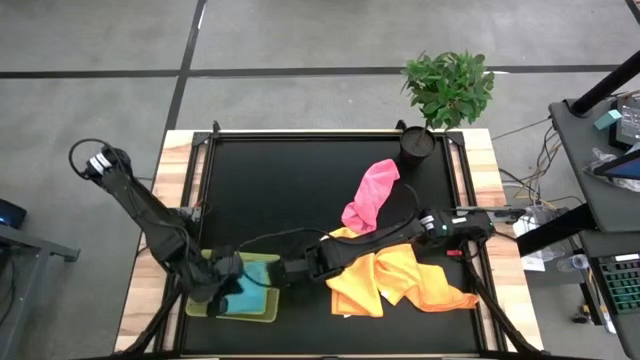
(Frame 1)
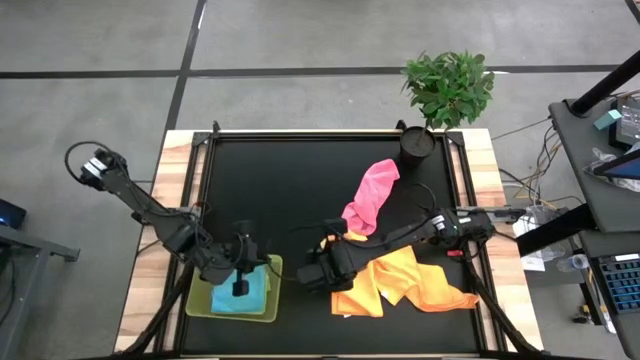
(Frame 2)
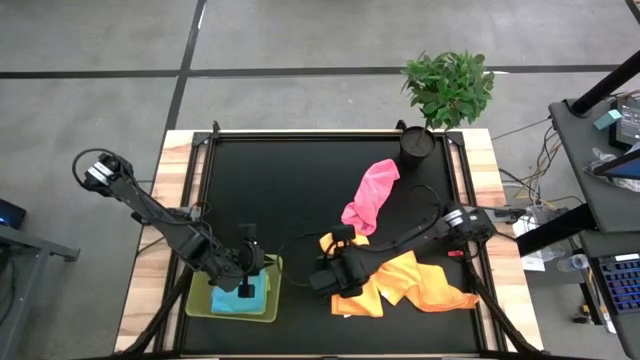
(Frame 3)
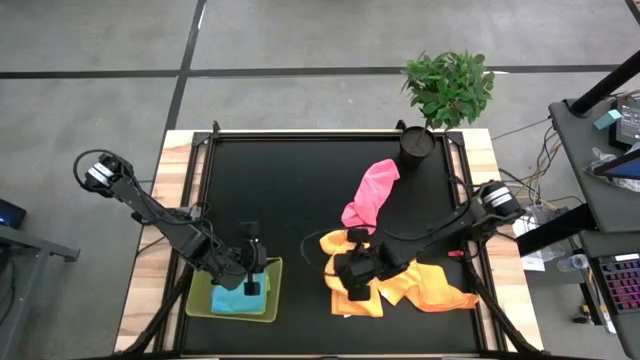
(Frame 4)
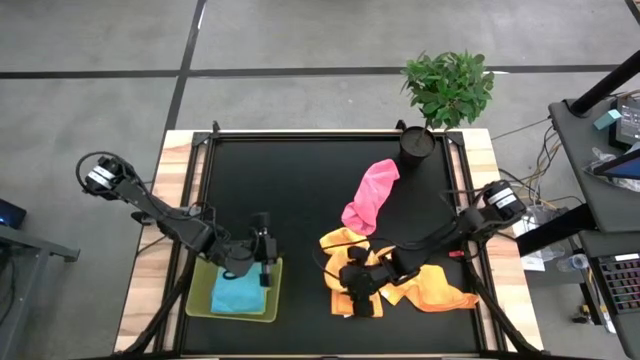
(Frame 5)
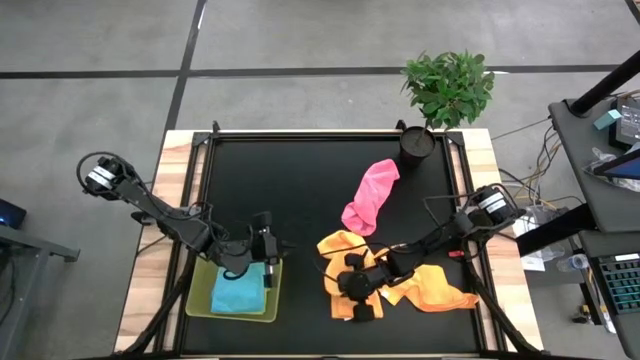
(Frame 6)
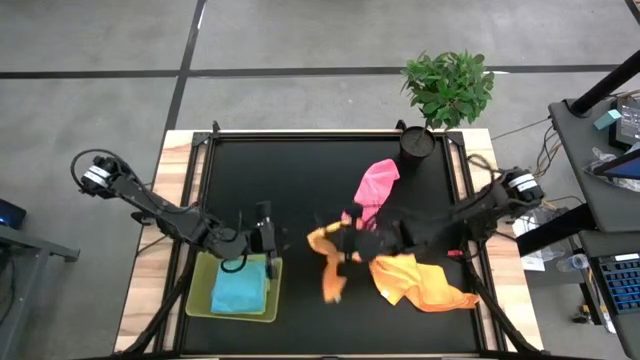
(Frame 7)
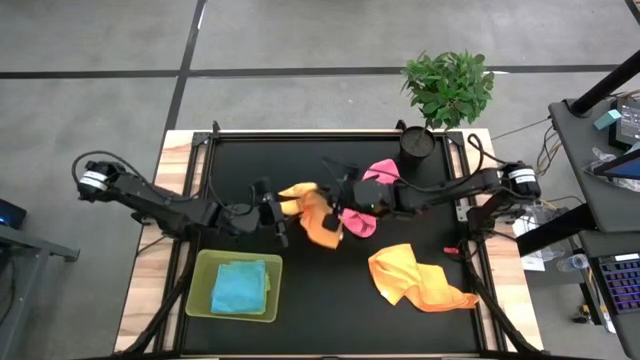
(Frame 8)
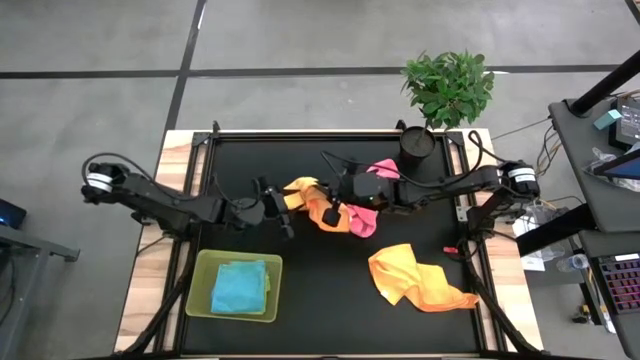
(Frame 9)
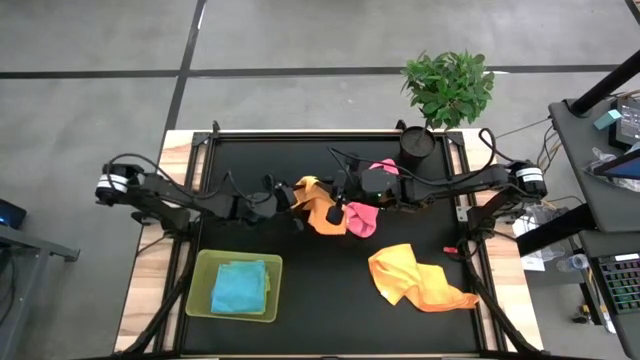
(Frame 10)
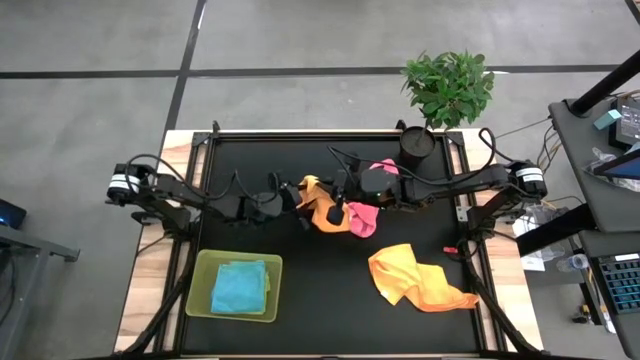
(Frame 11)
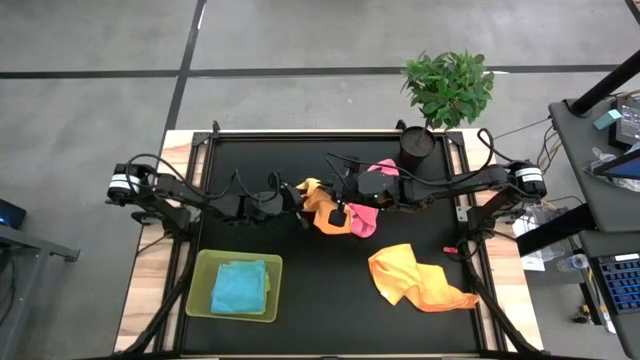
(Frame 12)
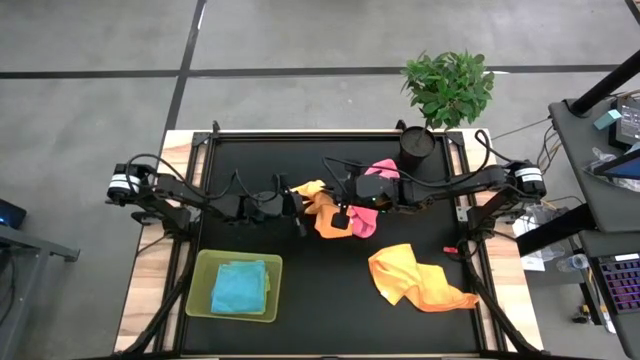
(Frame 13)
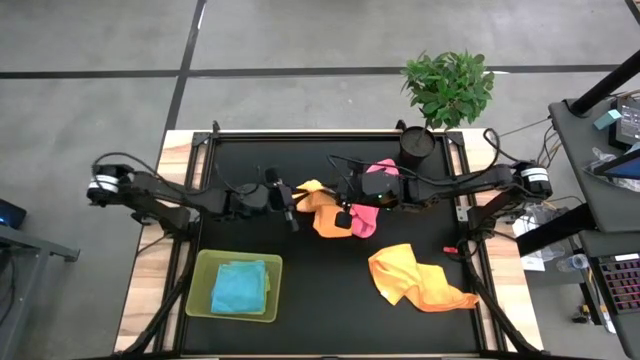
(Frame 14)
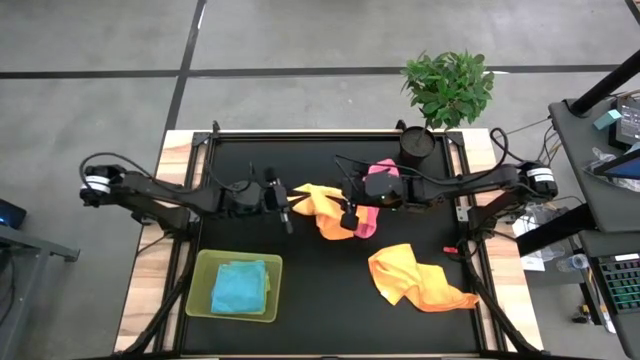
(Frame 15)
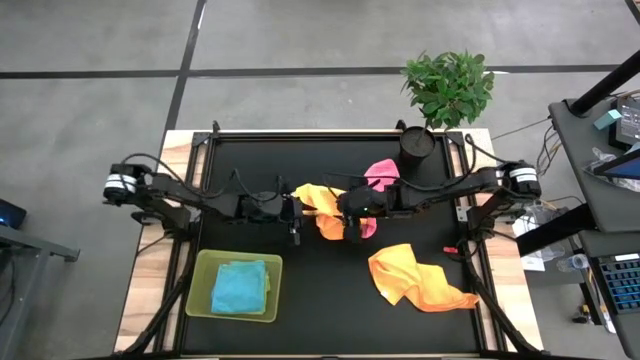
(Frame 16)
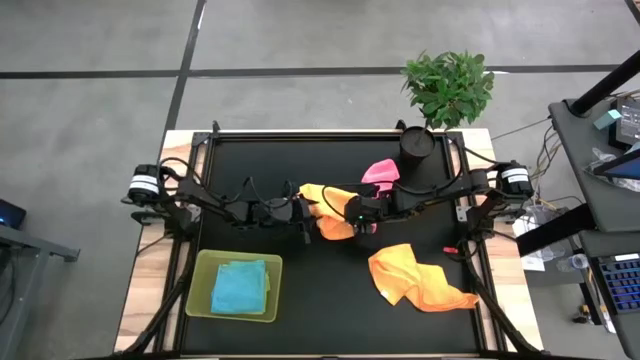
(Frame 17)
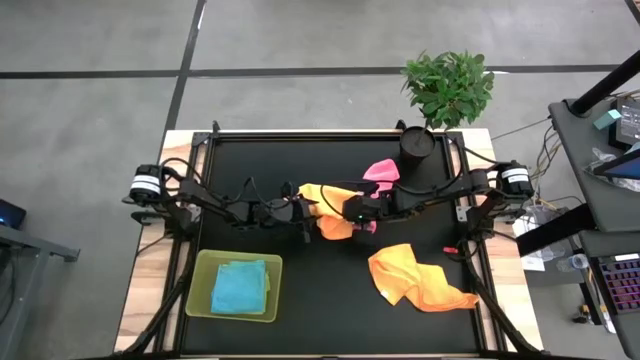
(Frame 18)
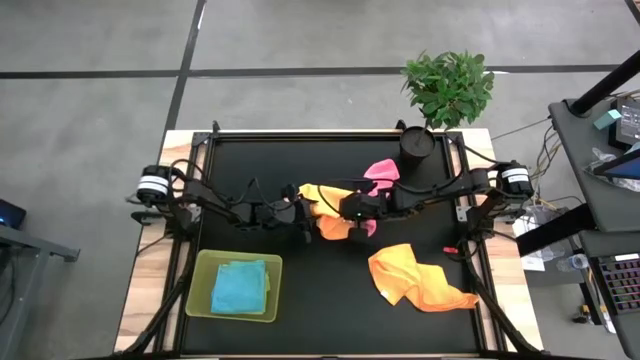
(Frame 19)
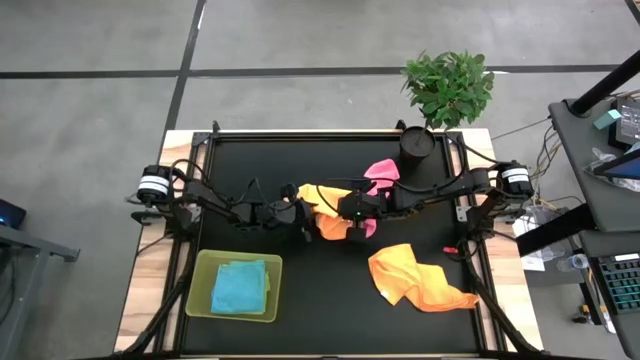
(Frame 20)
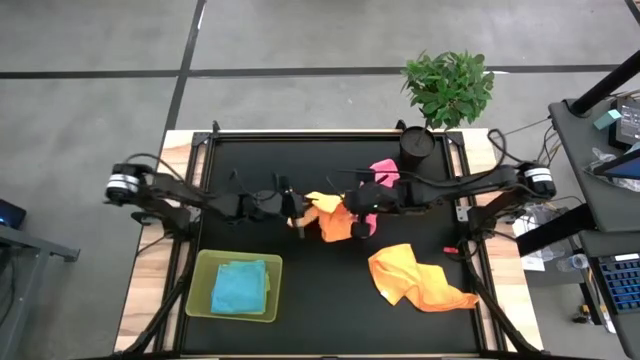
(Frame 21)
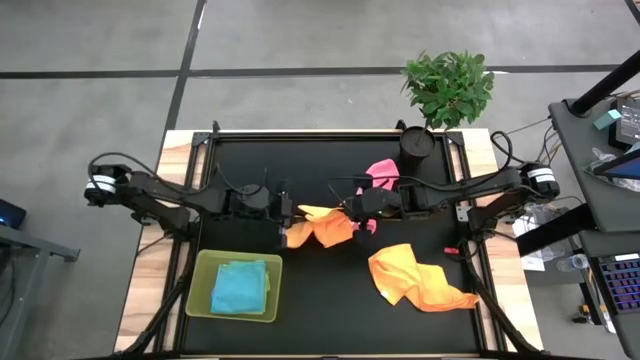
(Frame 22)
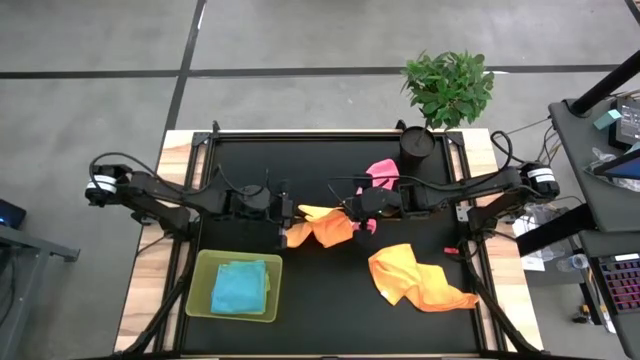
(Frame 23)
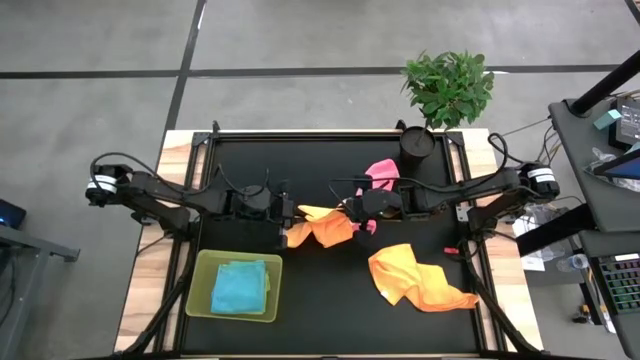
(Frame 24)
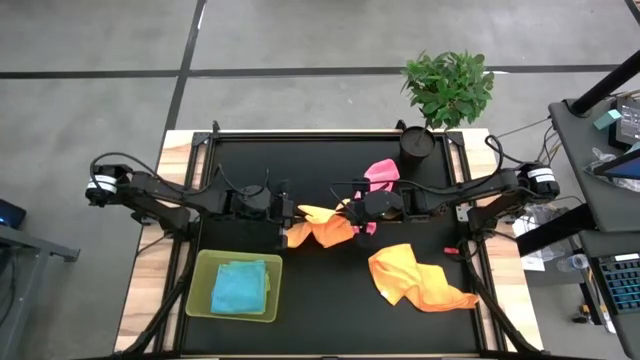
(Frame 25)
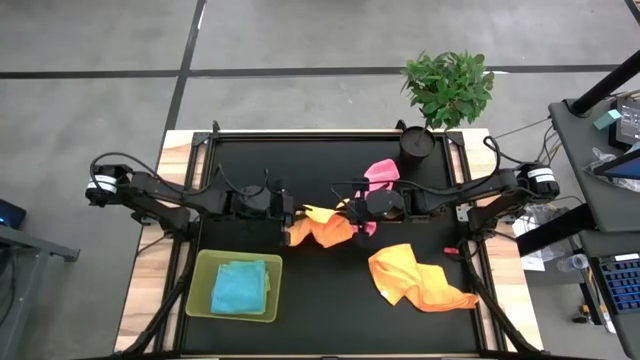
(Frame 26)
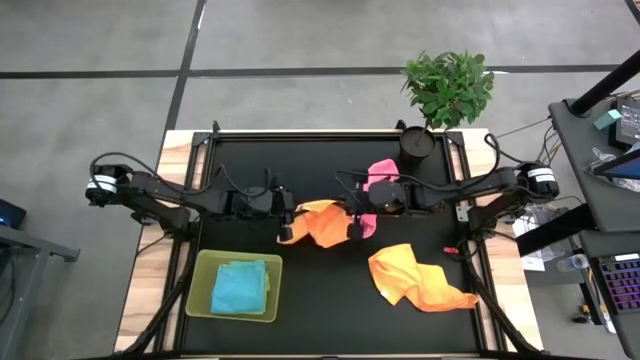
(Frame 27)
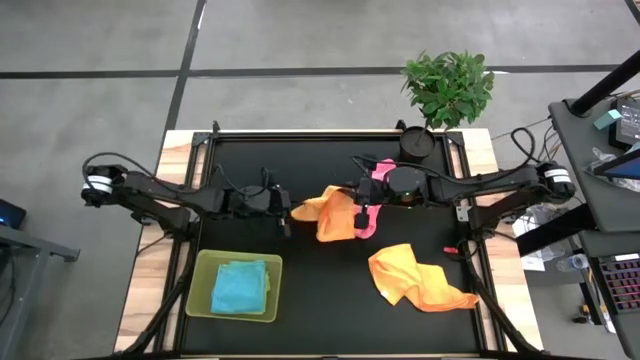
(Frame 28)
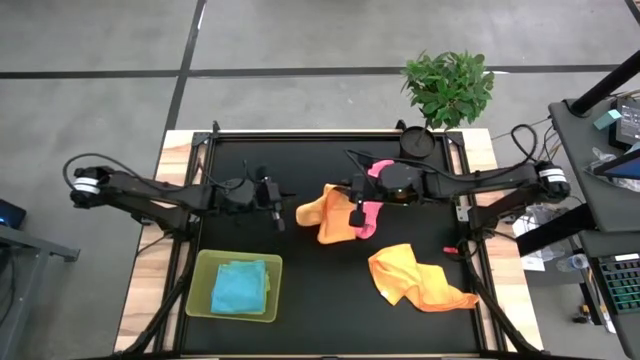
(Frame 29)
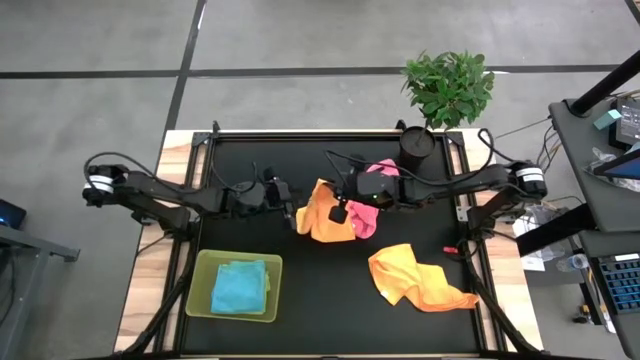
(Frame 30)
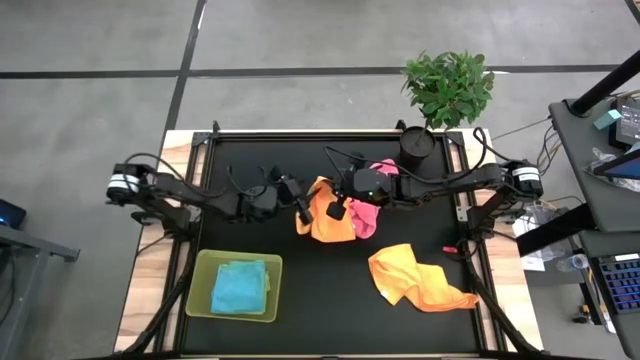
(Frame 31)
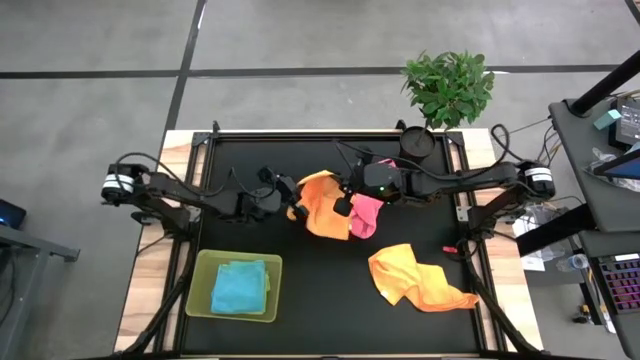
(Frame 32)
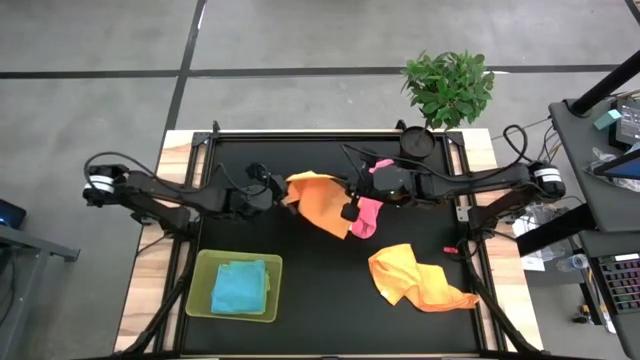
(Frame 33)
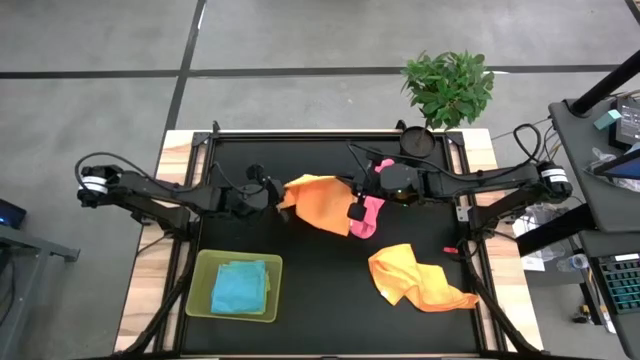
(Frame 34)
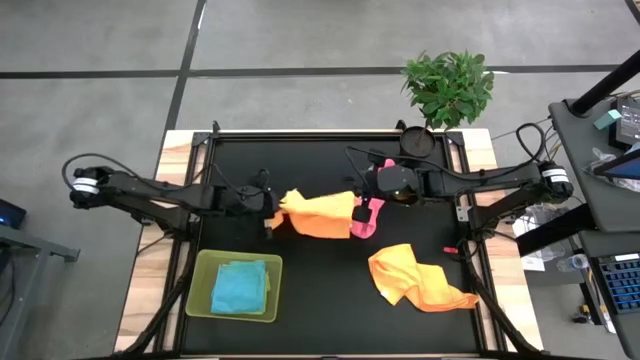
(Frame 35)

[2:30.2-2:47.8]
Task: Fold microfiber towels
Fold the left orange microfiber towel

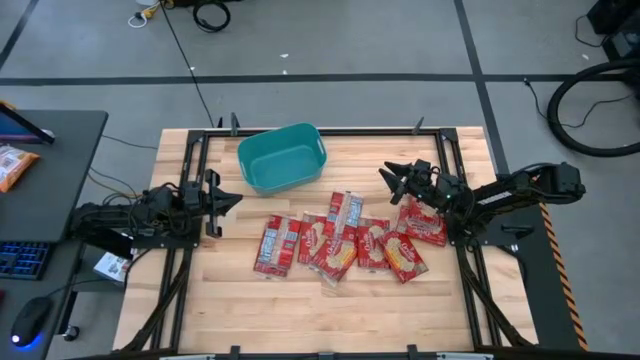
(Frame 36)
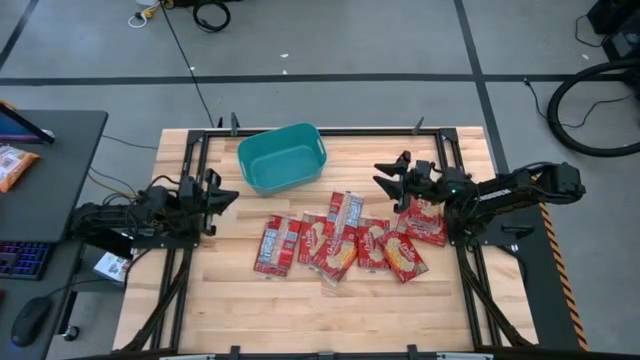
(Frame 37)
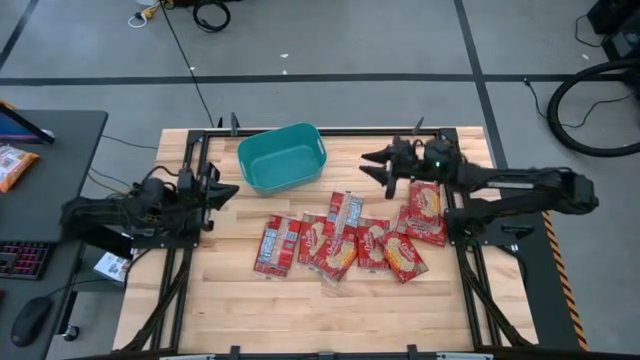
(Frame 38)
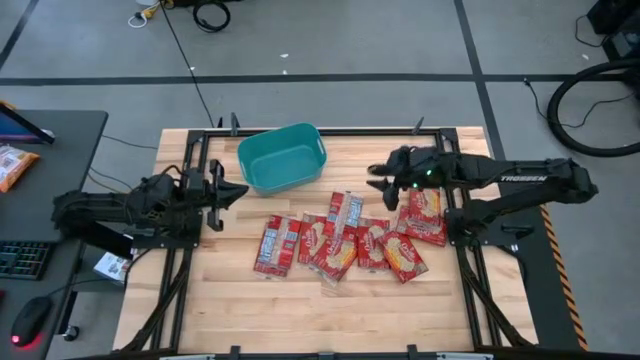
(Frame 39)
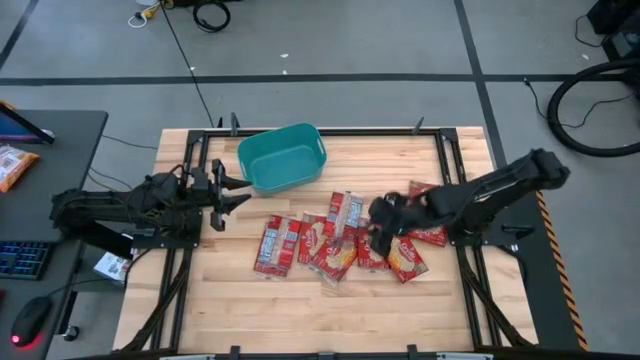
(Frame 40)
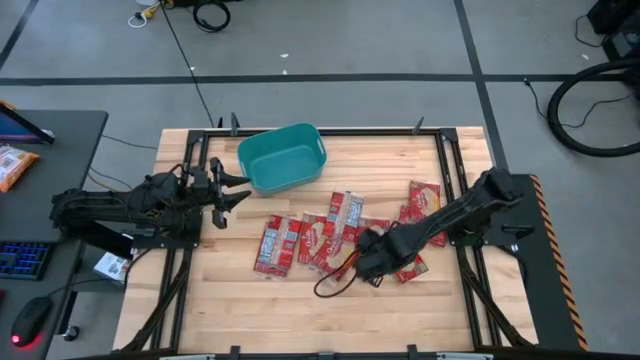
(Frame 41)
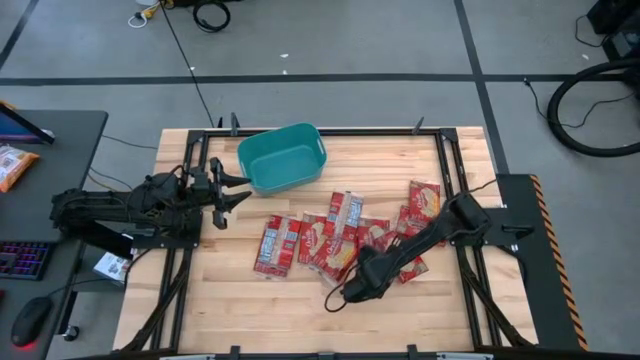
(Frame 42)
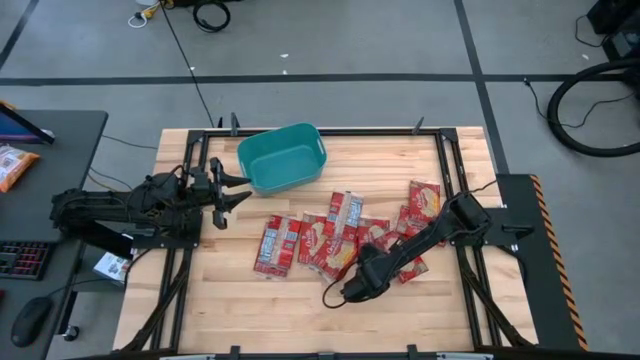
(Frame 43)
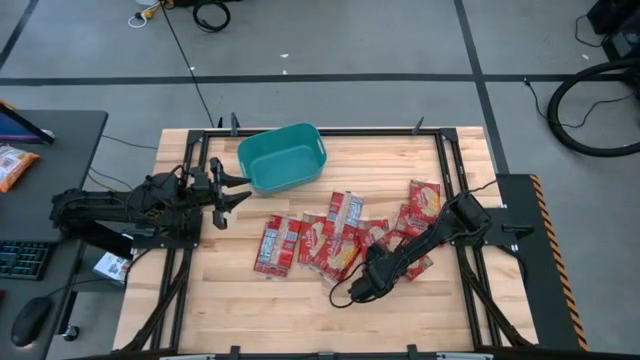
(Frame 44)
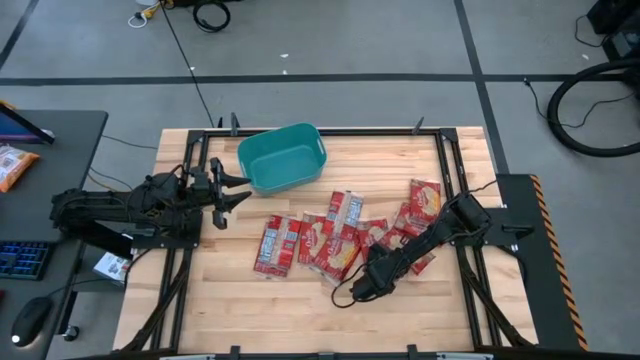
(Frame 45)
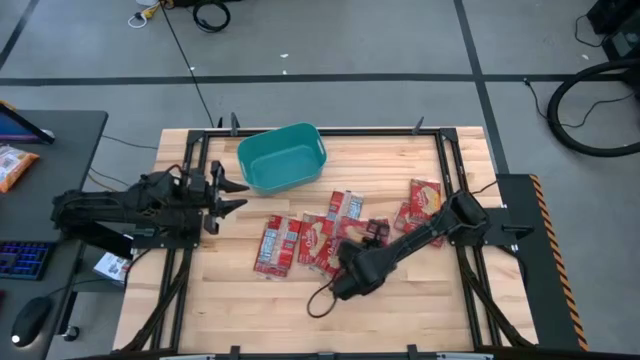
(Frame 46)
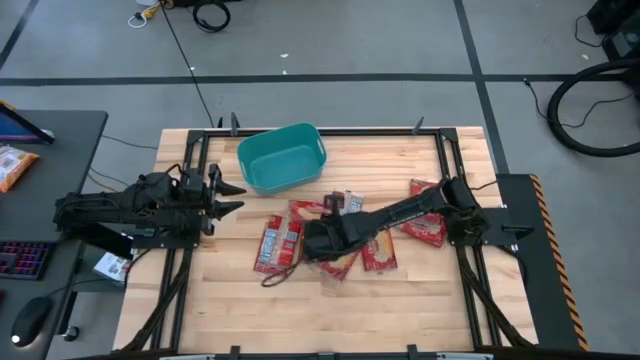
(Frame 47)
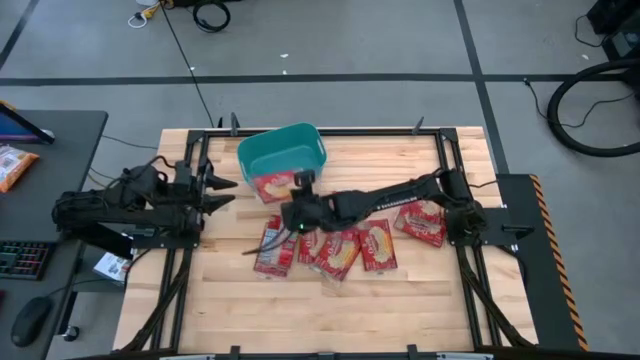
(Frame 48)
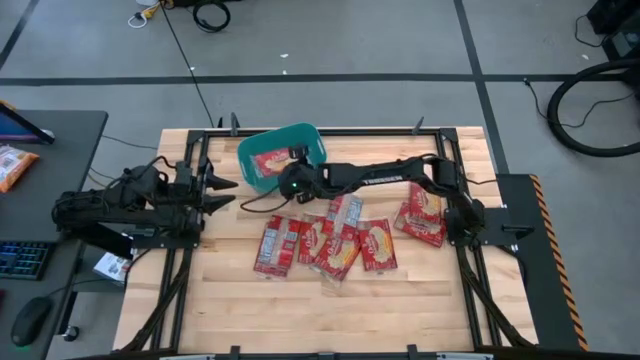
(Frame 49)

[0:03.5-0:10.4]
Task: Sort popcorn bags into baskets
Put the red popcorn bag into the green bin
